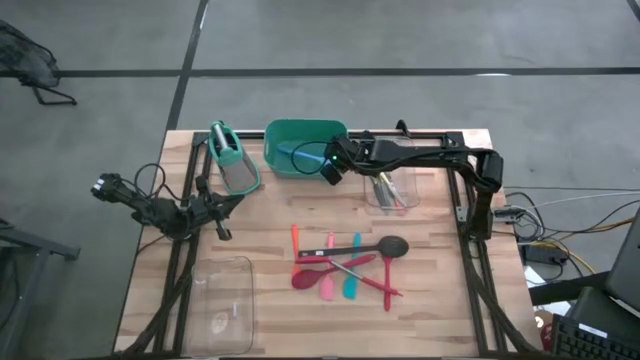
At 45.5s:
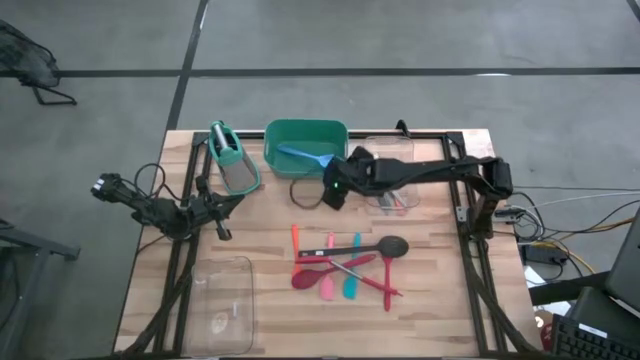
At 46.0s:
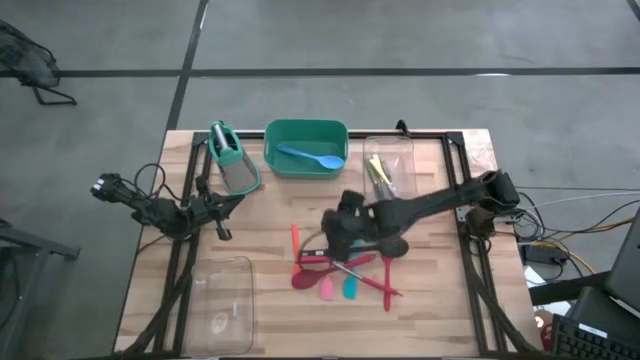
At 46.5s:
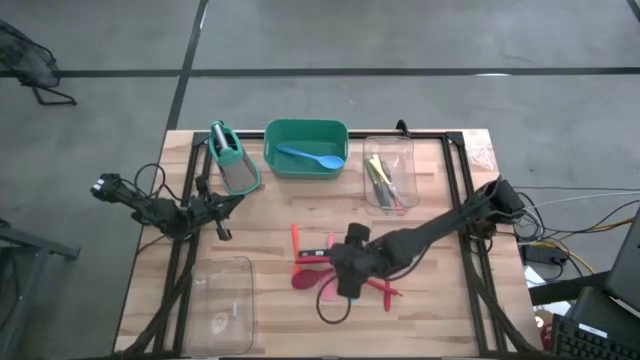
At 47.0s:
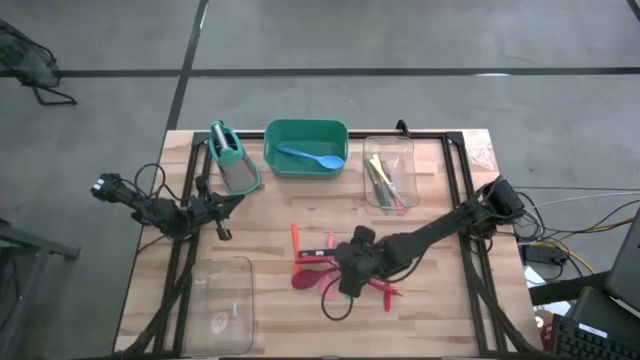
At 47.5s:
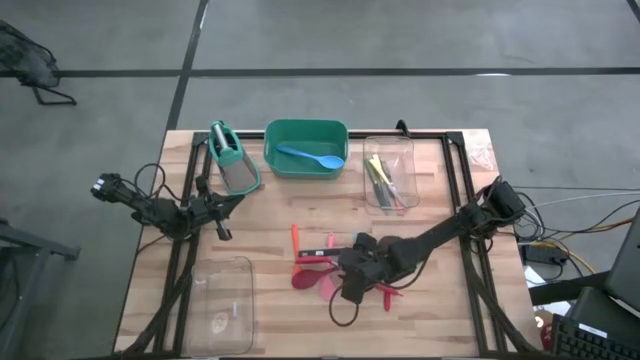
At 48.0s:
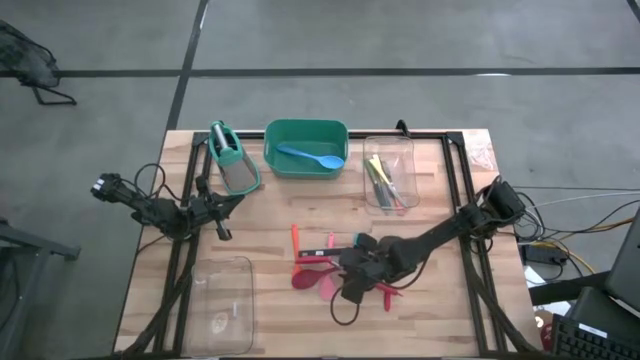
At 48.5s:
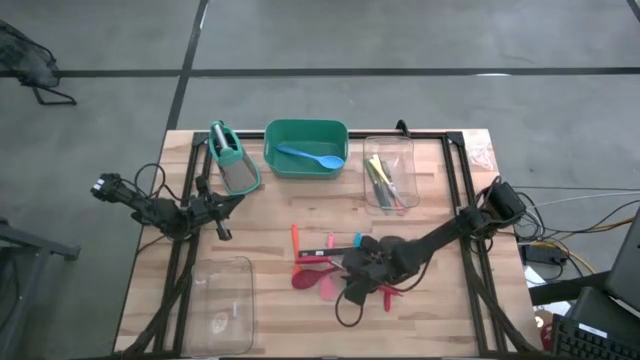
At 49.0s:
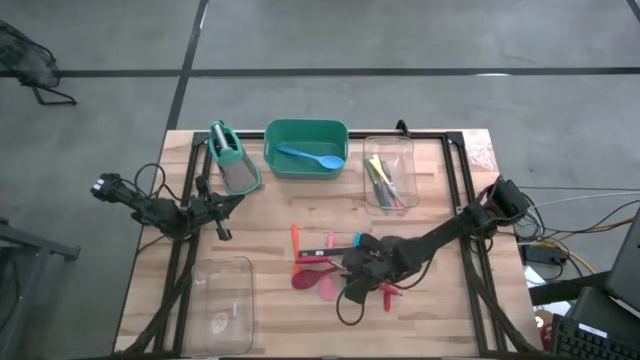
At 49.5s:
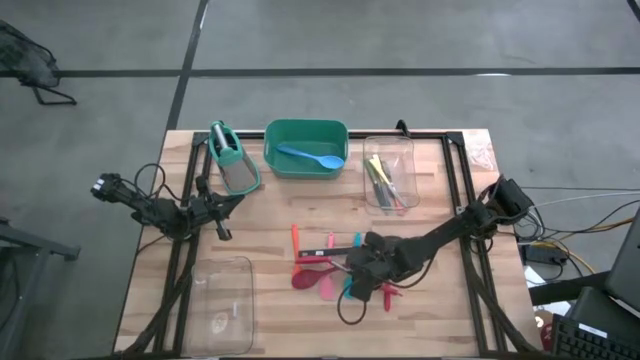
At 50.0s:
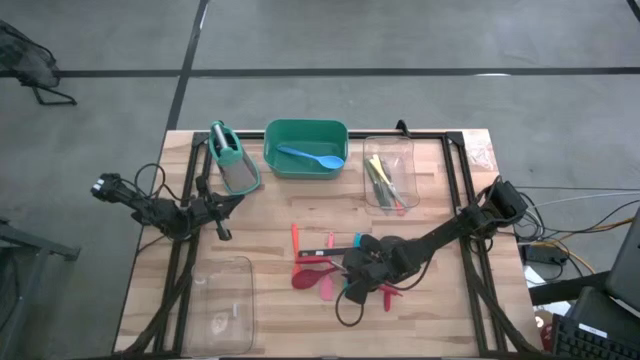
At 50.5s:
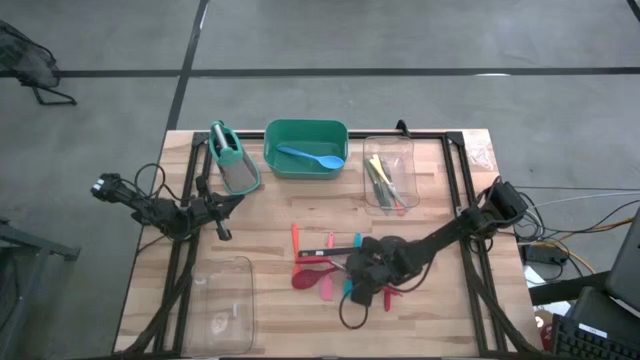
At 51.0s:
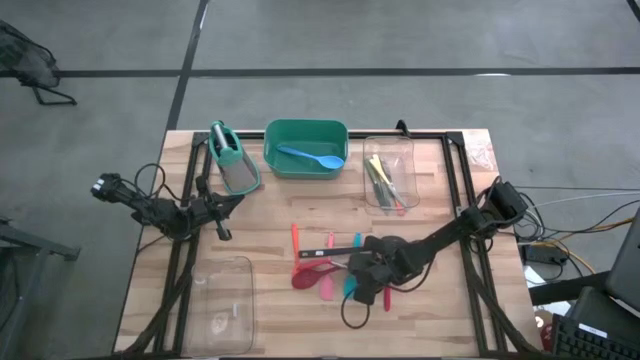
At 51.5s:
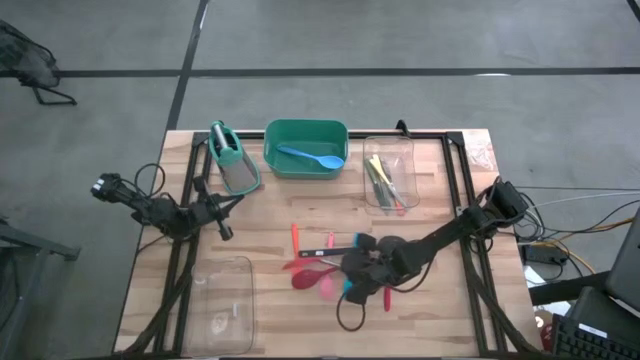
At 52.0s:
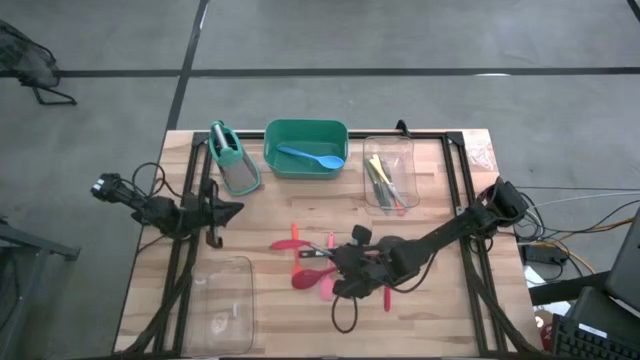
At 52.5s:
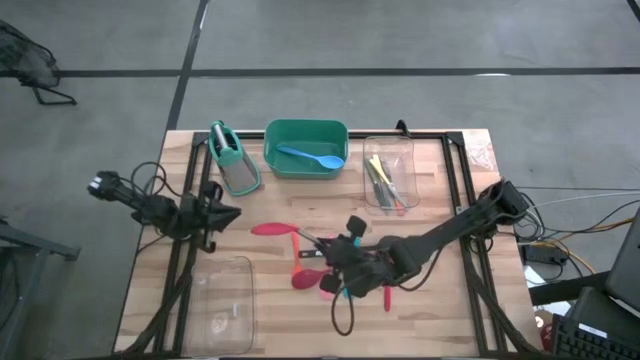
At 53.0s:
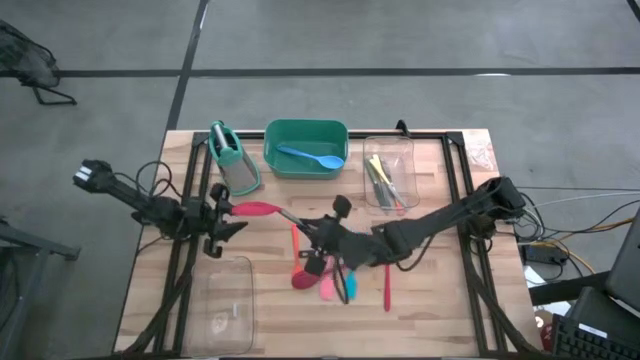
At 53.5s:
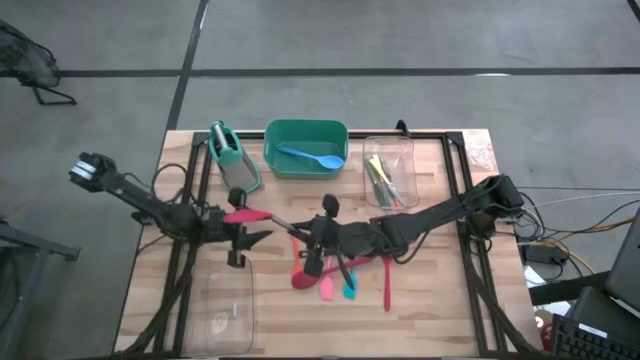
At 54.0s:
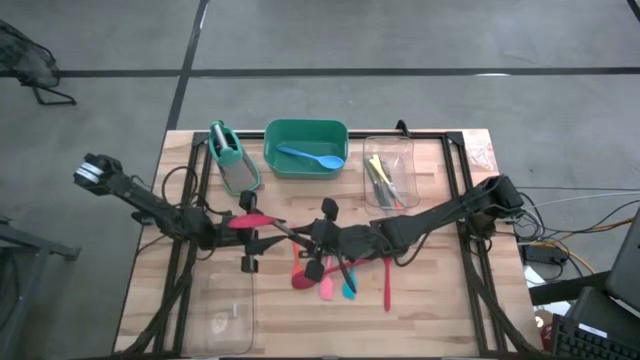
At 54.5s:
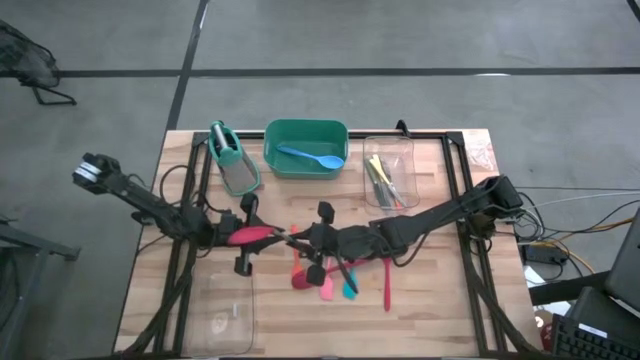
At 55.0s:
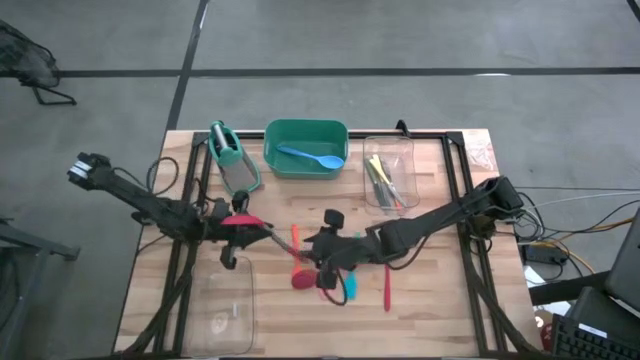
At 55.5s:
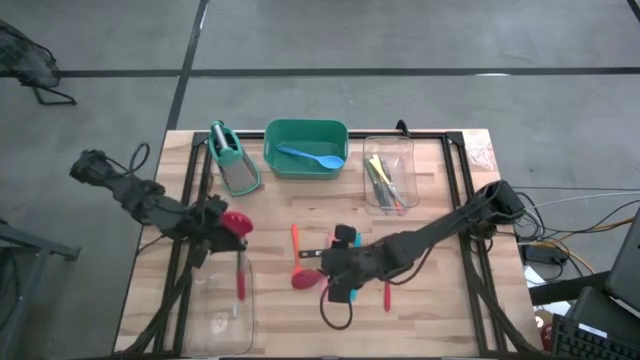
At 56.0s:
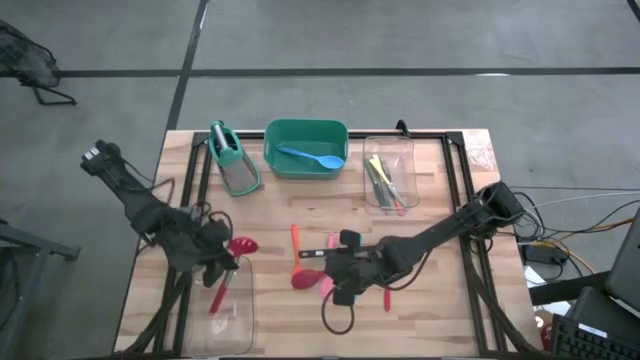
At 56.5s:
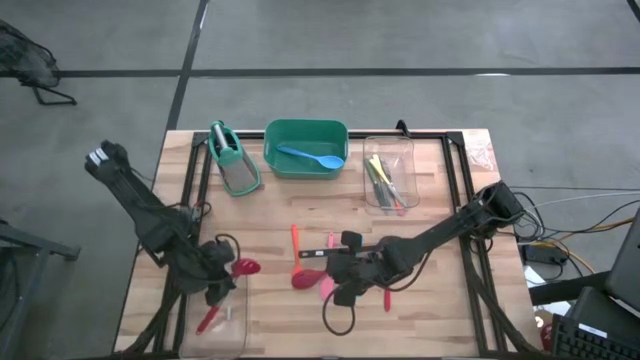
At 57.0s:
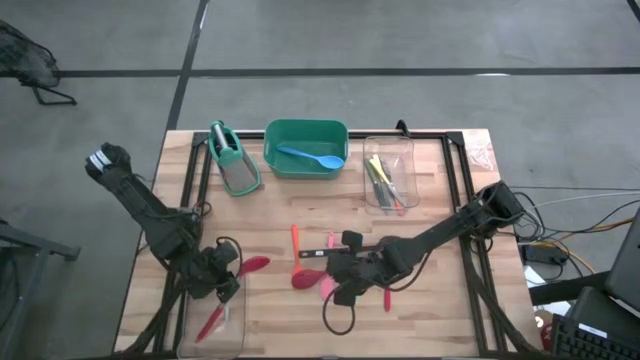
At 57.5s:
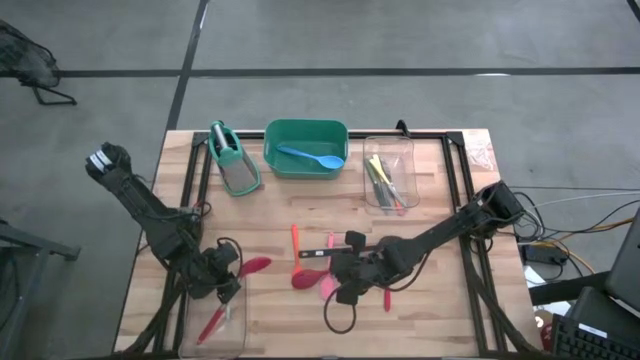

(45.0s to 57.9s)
Task: Pick & Place Kitchen Items
Put the silver red slotted spoon into the bottom transparent bin

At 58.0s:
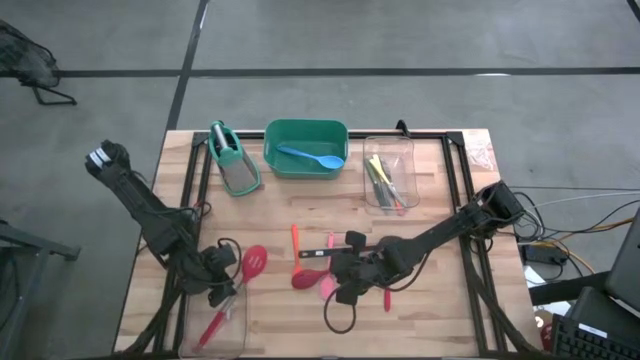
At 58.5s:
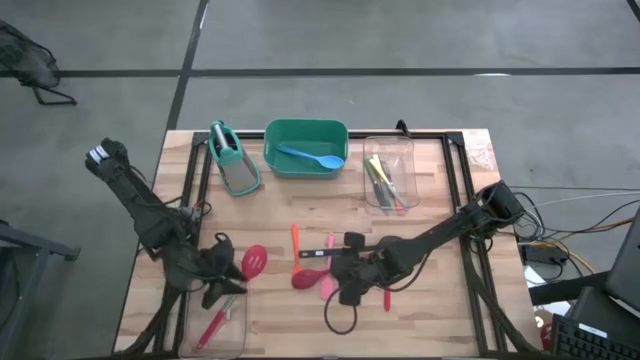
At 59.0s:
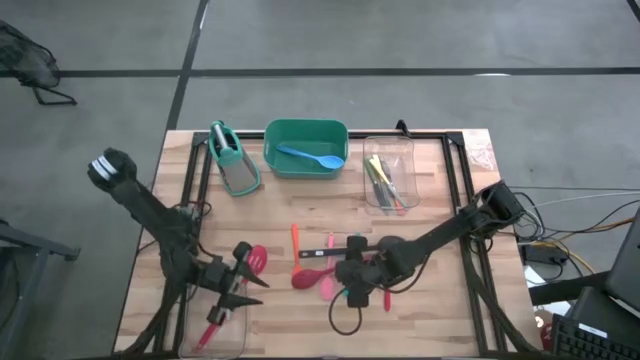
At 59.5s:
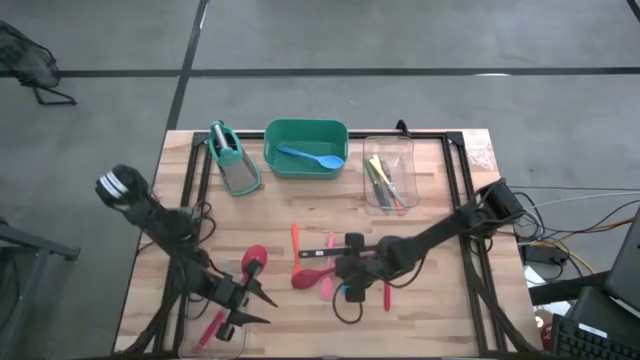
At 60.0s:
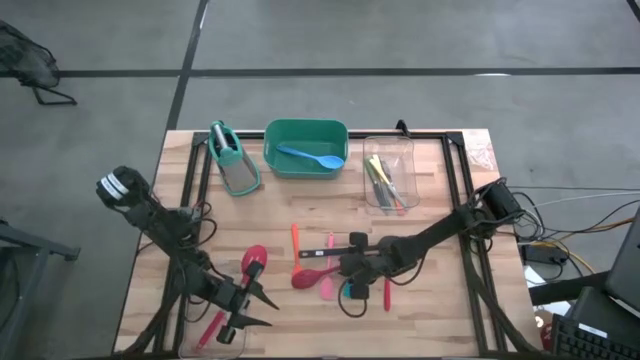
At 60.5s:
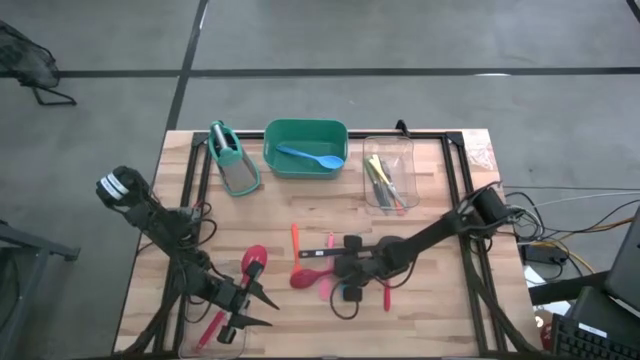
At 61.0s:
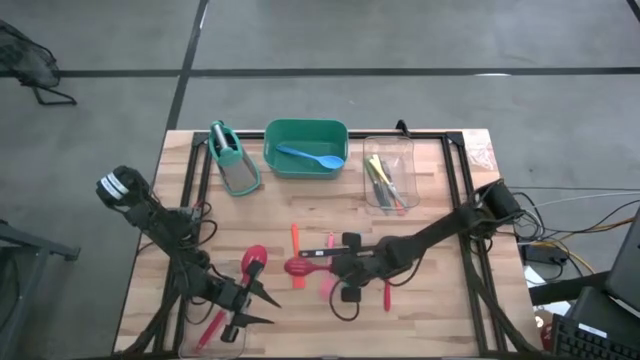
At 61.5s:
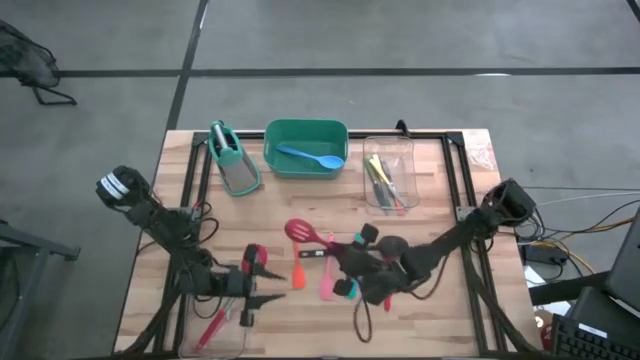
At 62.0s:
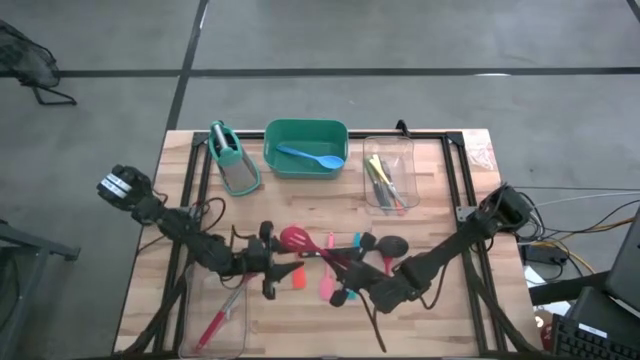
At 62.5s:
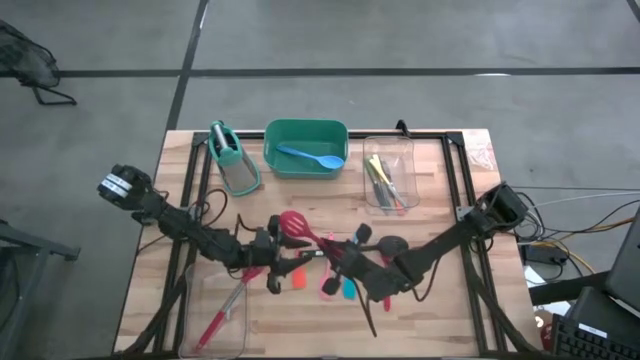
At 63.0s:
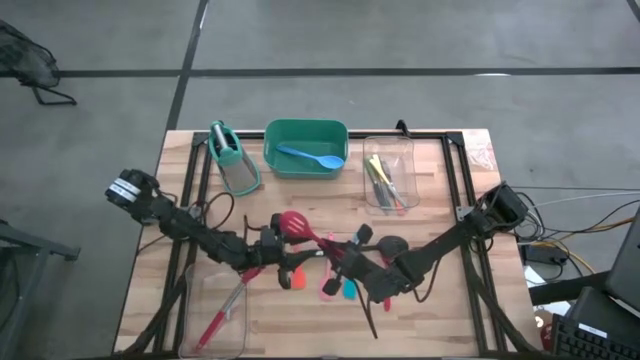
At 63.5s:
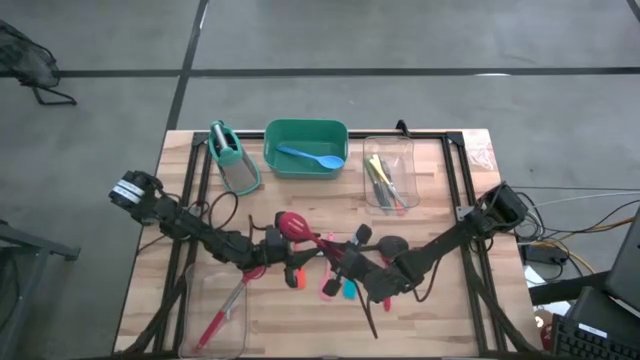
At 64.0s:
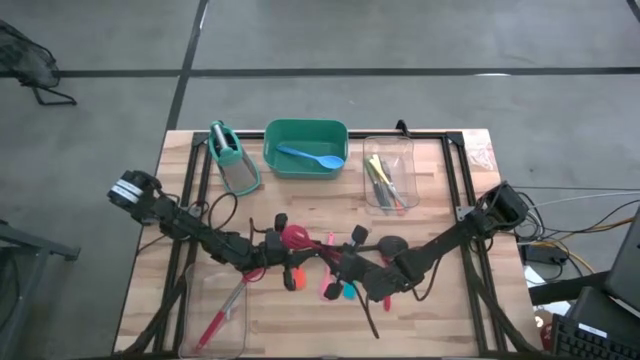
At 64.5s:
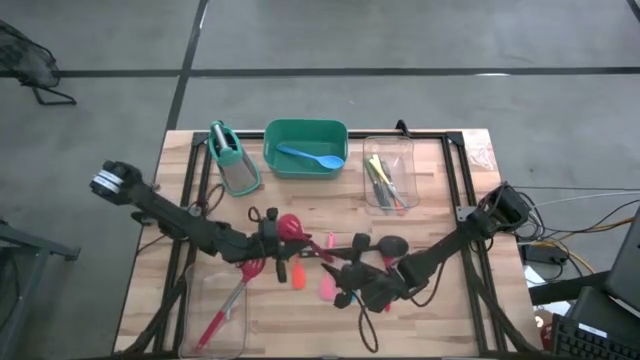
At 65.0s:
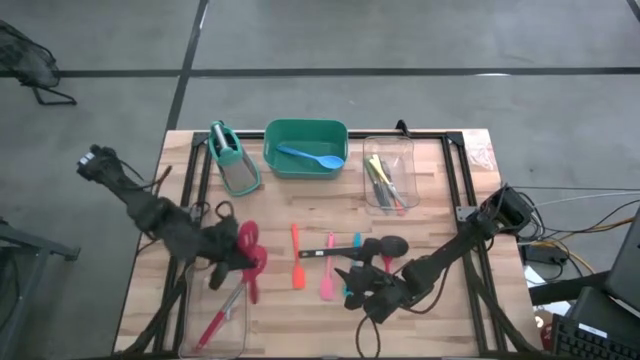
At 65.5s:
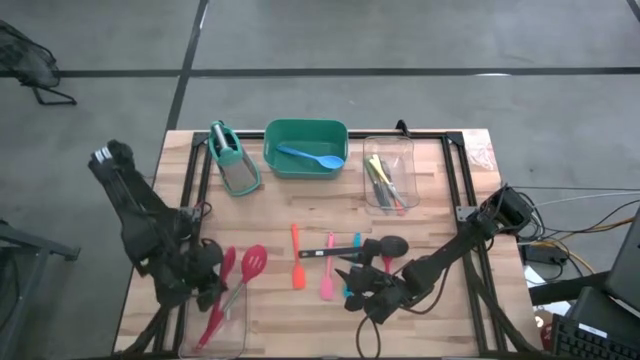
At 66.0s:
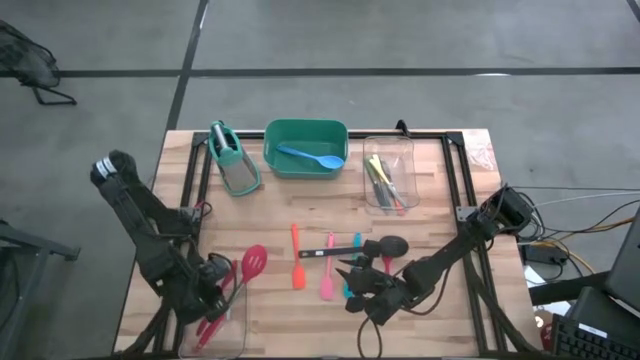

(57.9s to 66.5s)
Put the red slotted spoon into the bottom transparent bin

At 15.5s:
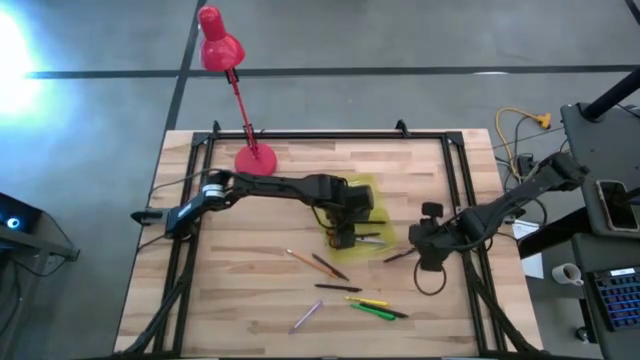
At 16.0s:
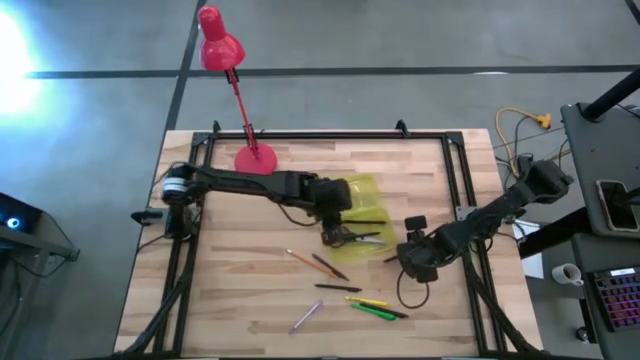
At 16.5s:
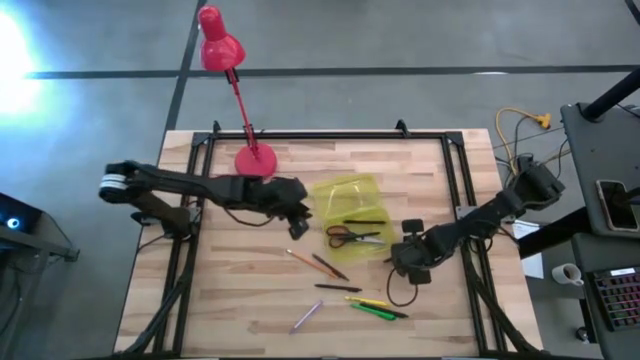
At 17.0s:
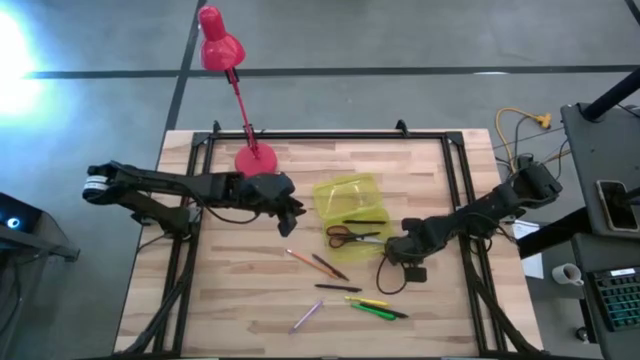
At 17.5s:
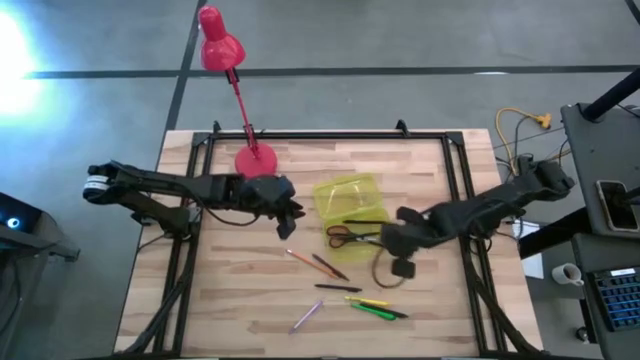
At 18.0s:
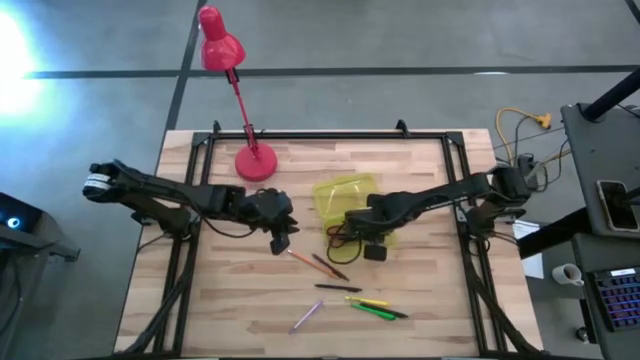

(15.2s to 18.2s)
Task: Pick & place school supplies into a supply box
Put the black pen into the yellow supply box
